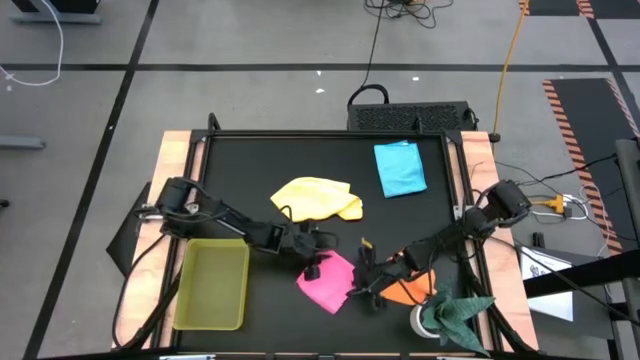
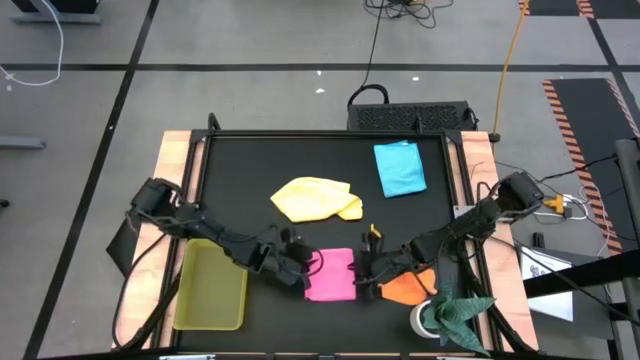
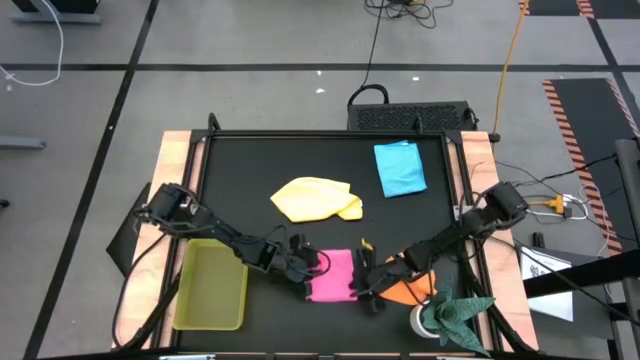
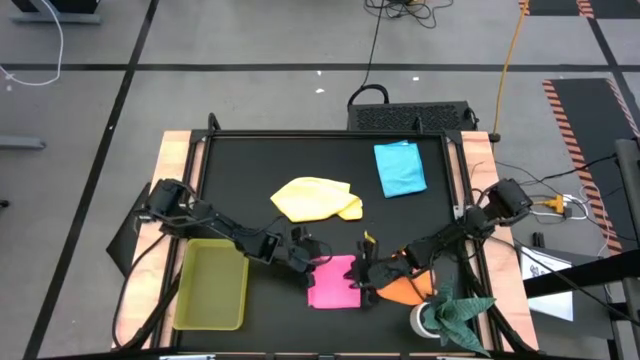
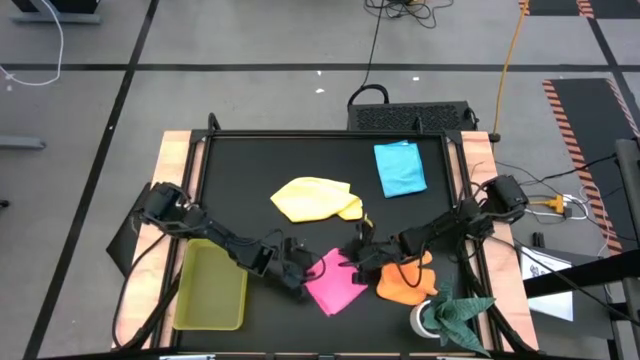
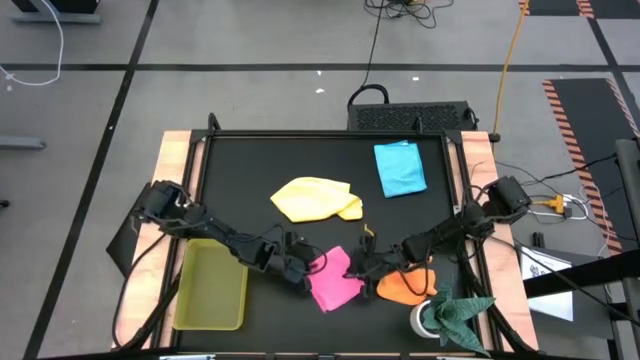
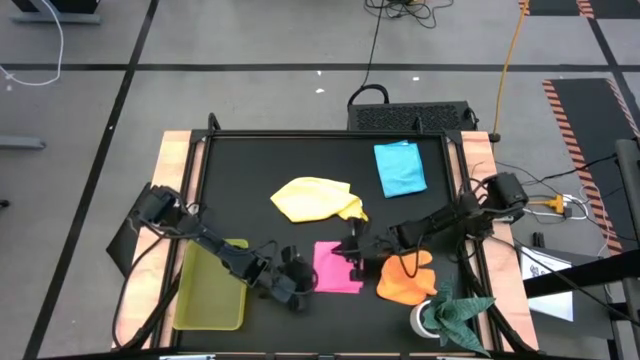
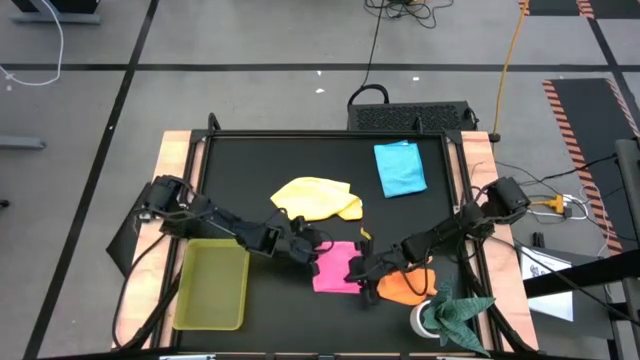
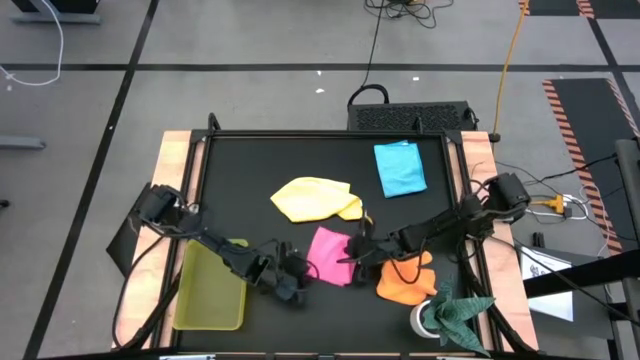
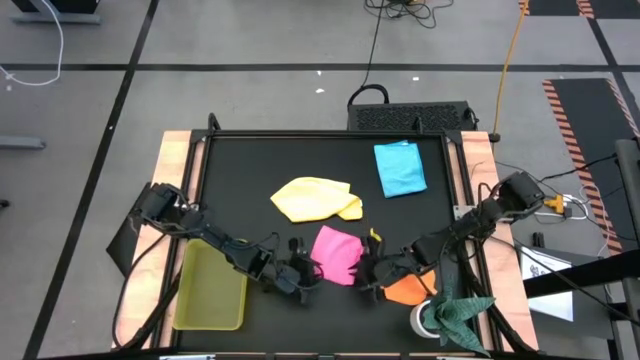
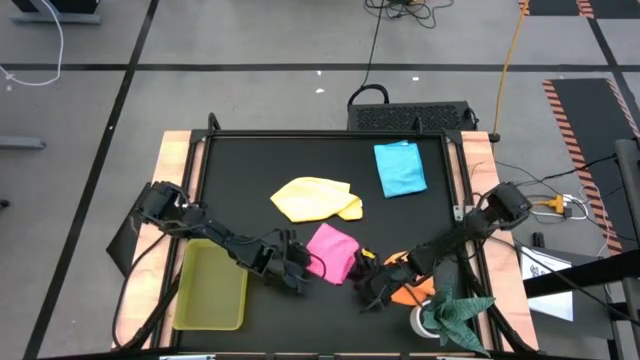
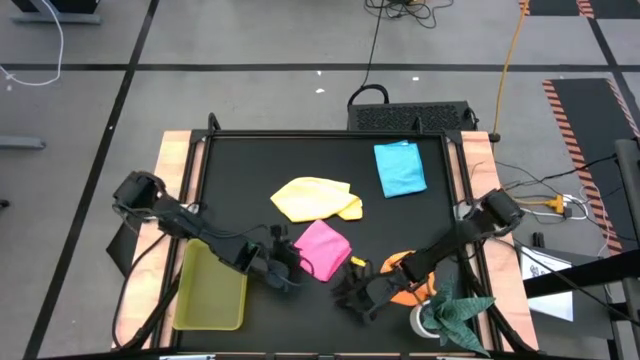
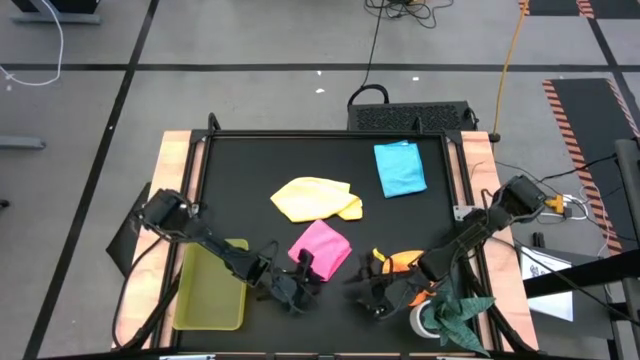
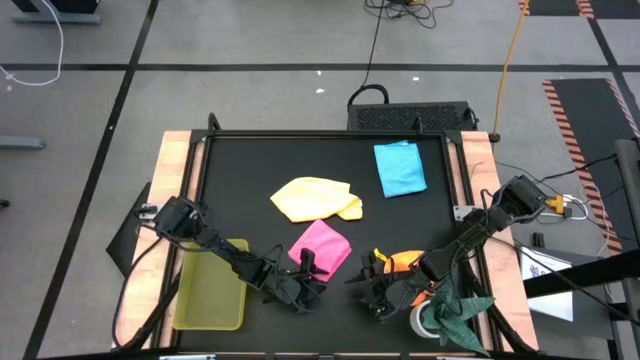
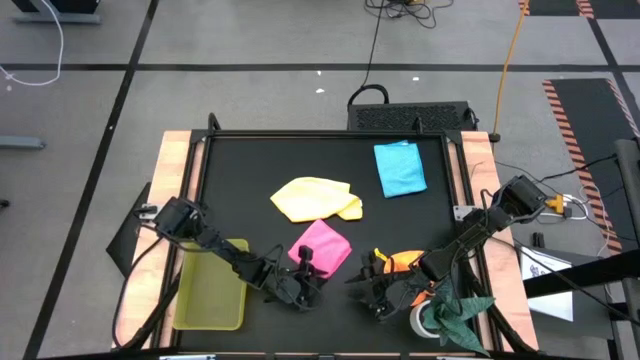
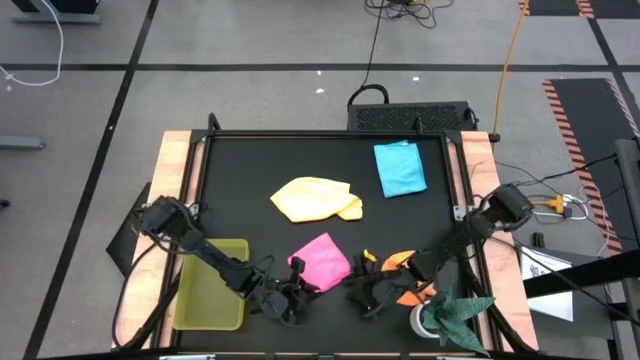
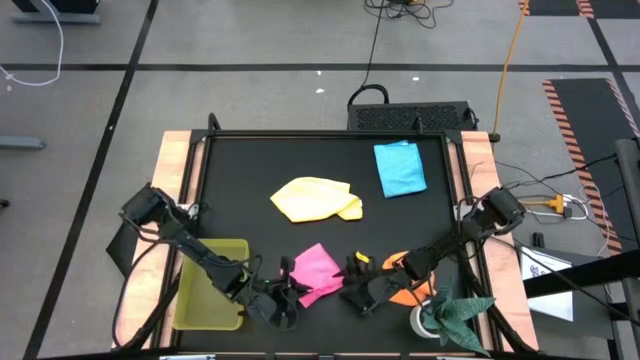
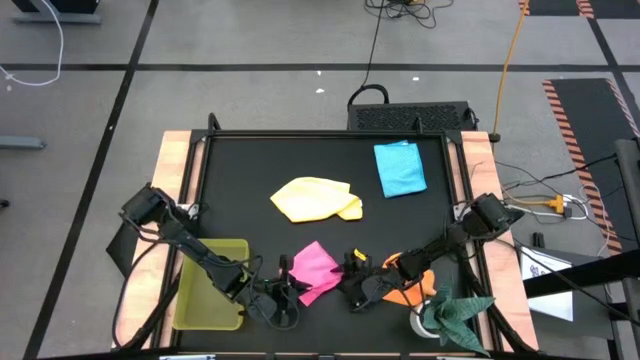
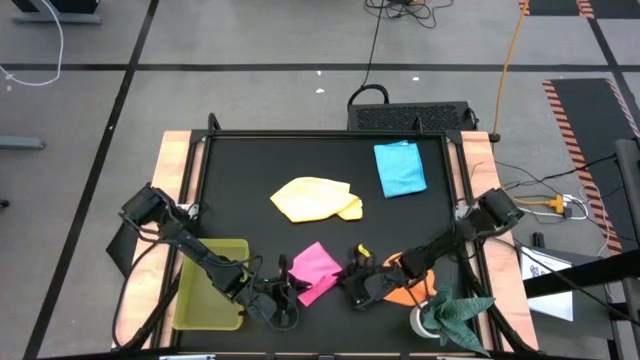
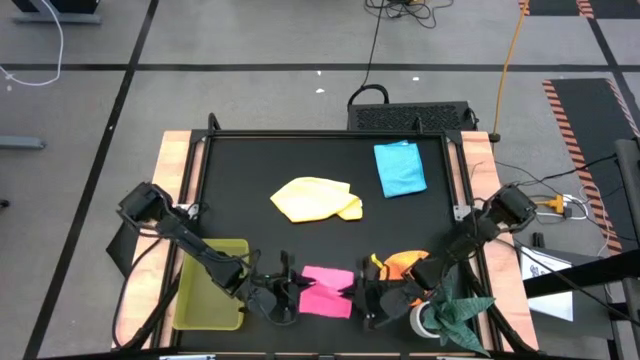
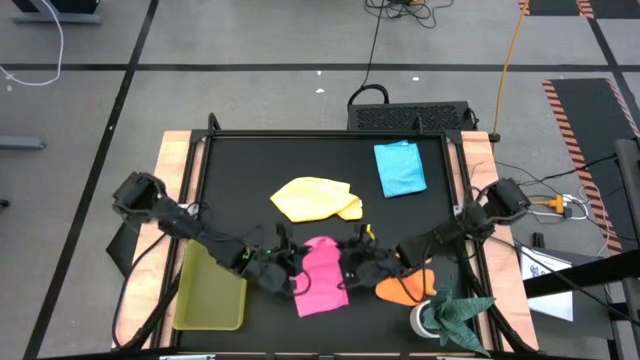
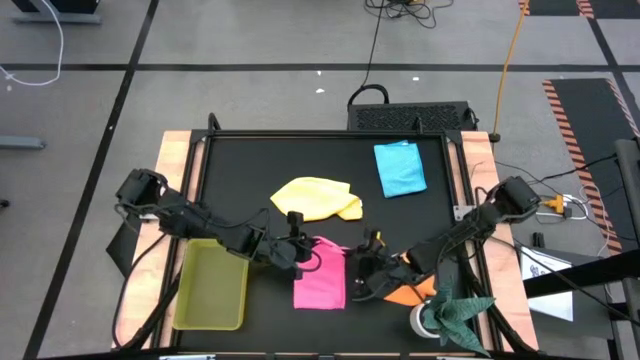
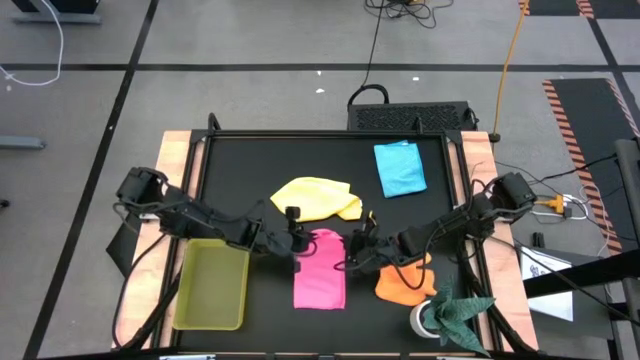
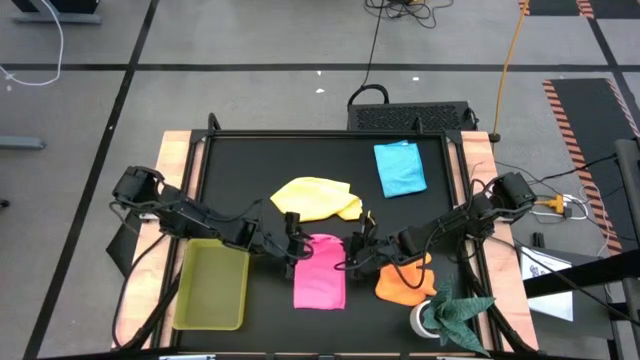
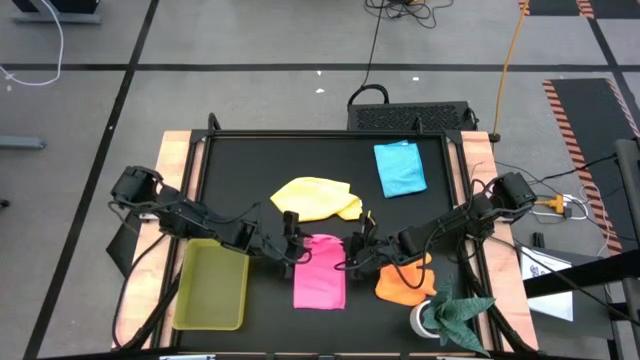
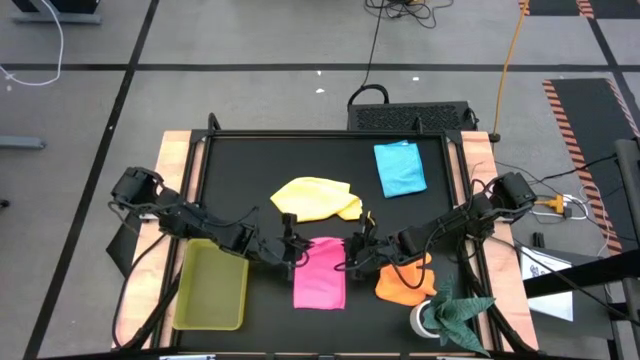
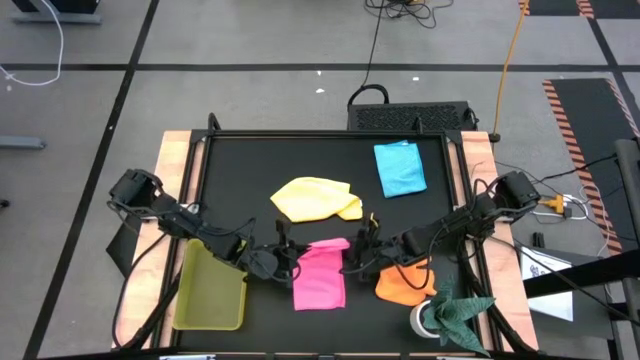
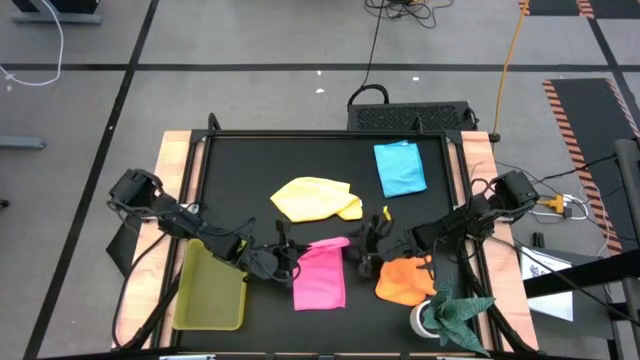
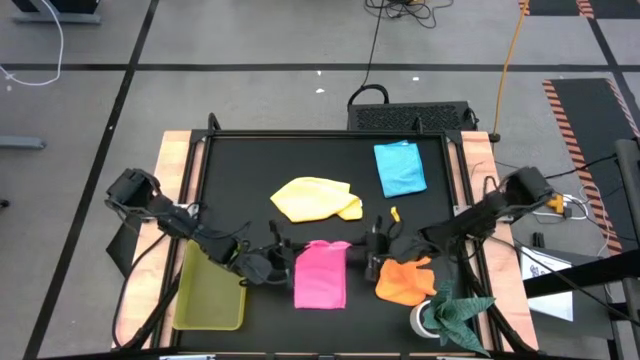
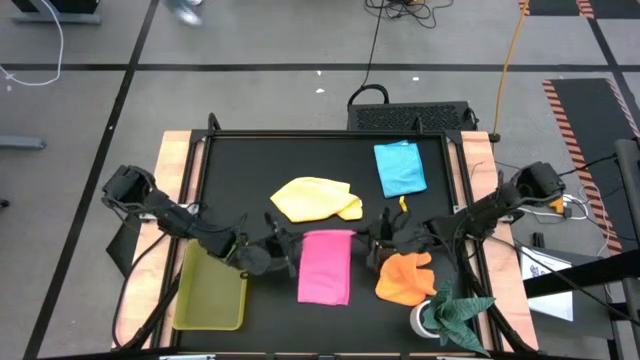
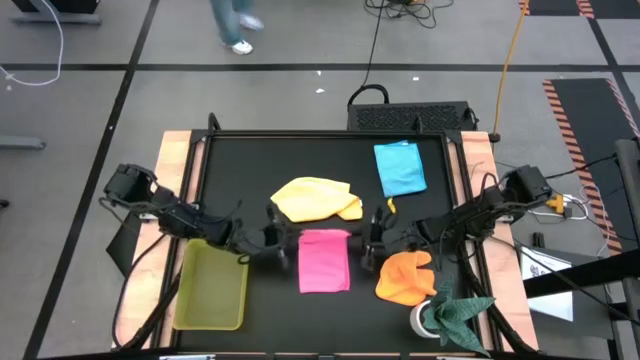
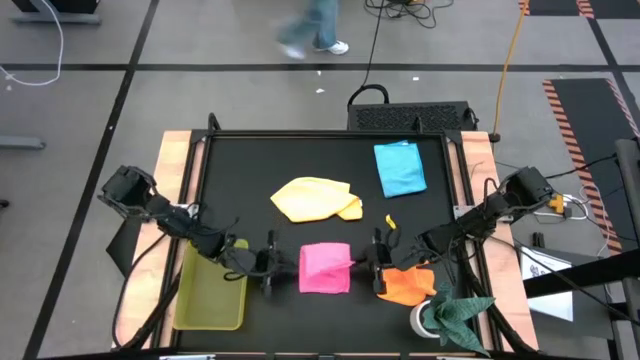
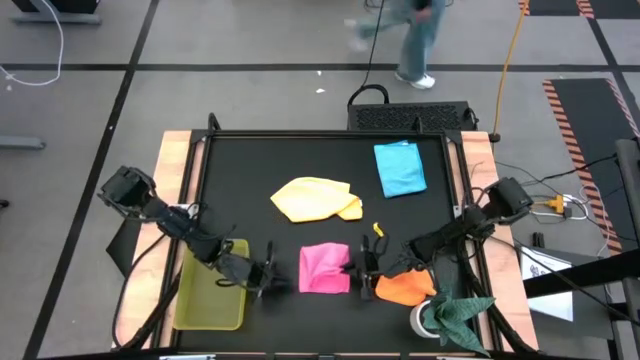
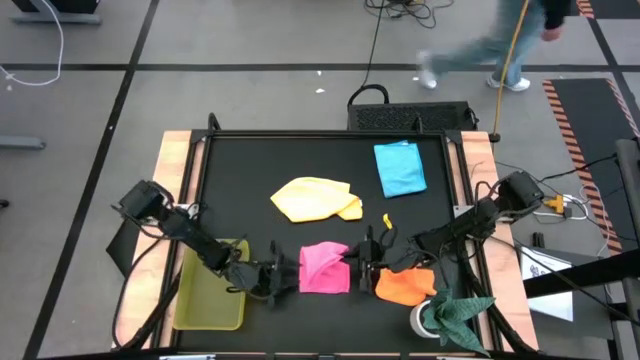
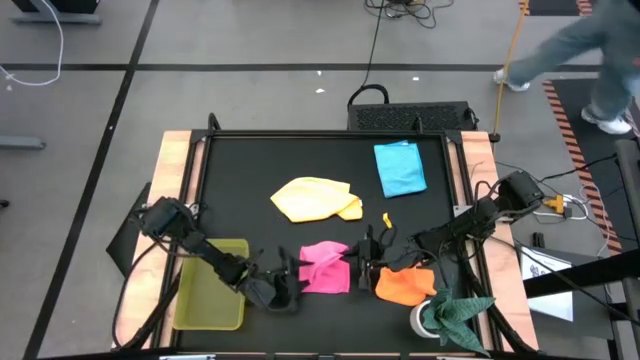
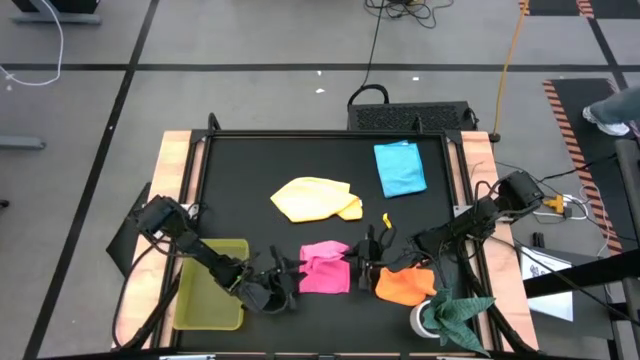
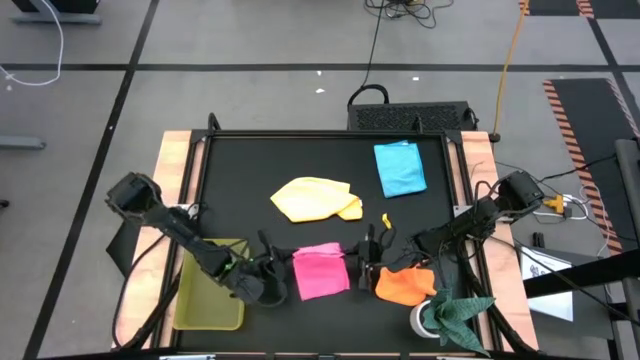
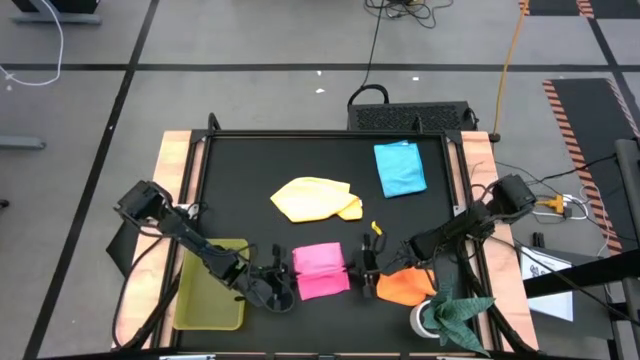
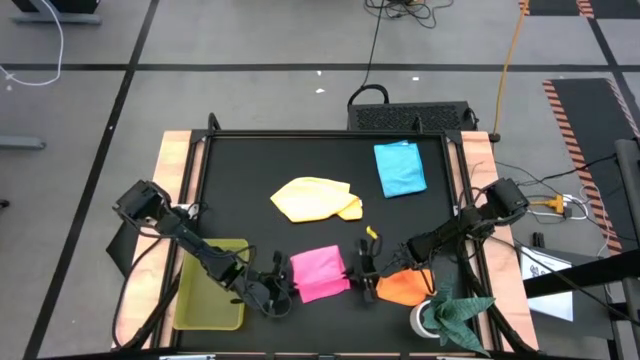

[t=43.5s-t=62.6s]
Task: Fold microfiber towels
Fold the pink microfiber towel

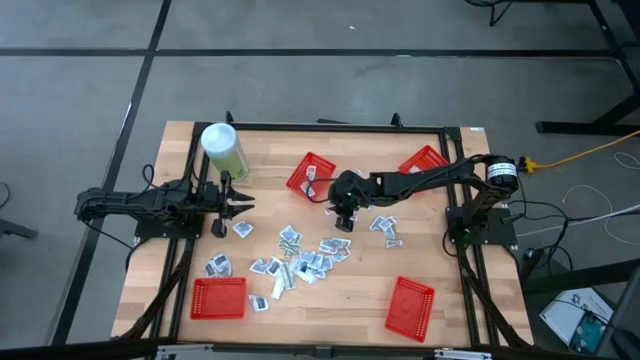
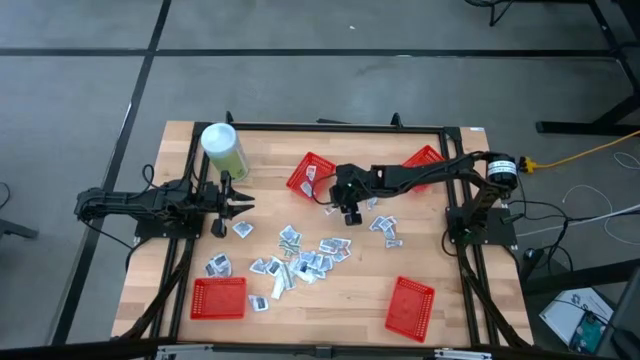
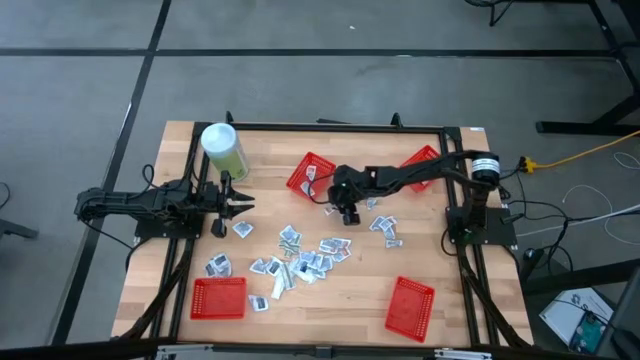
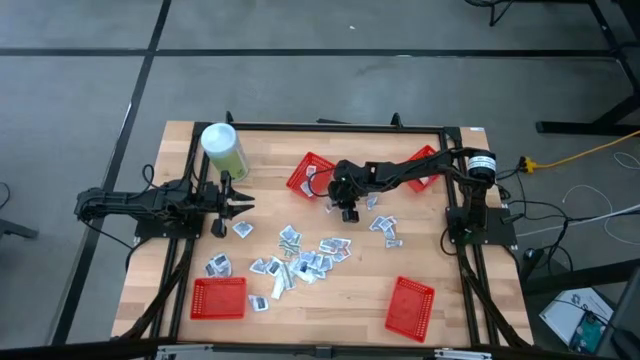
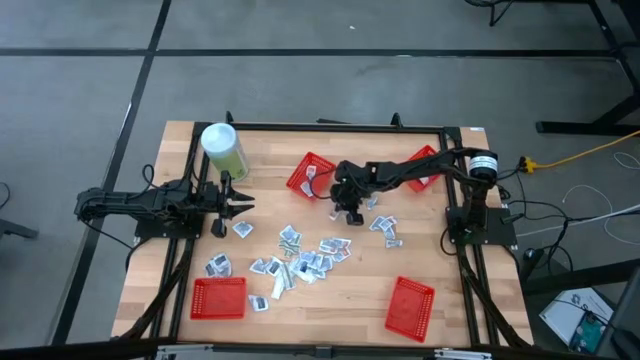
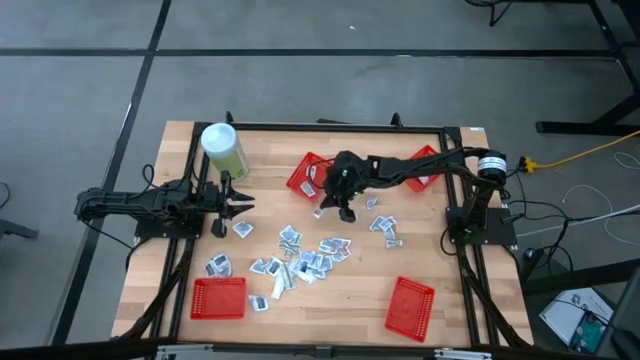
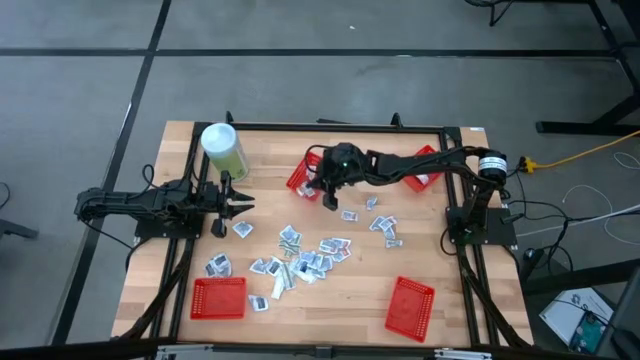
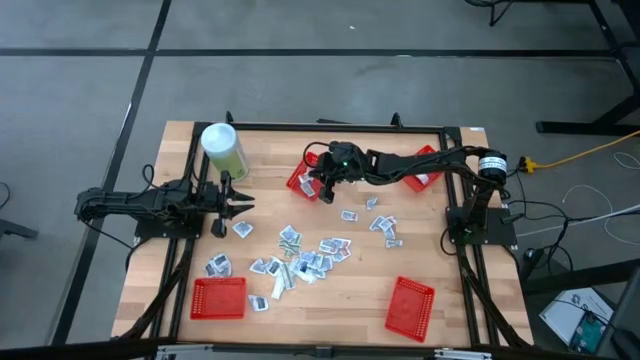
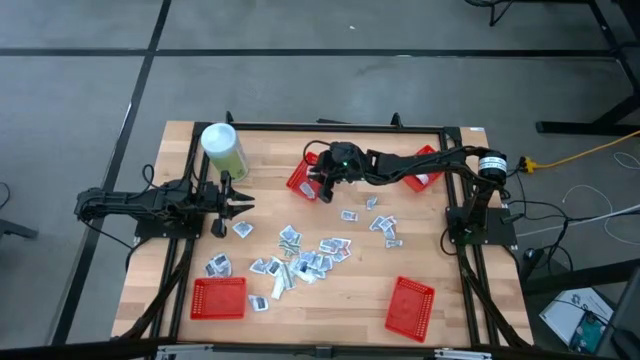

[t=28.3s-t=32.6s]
Task: Pick & Place First Aid Supplies
Put the orange ointment pack into the red container
